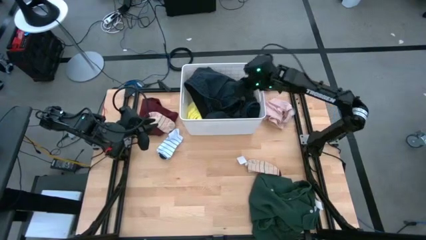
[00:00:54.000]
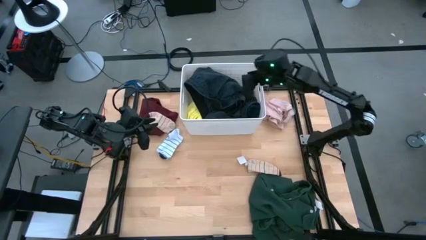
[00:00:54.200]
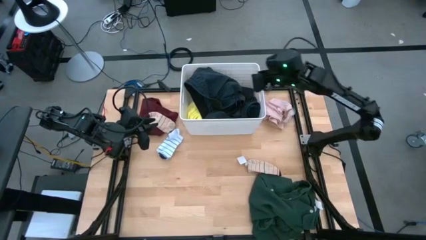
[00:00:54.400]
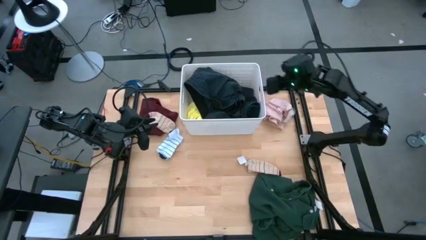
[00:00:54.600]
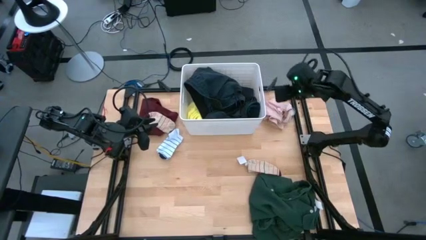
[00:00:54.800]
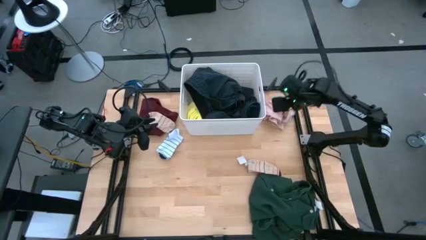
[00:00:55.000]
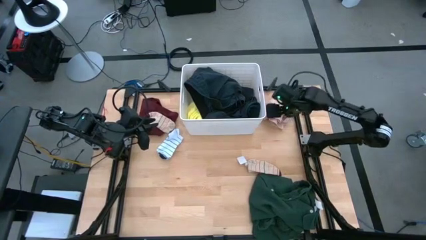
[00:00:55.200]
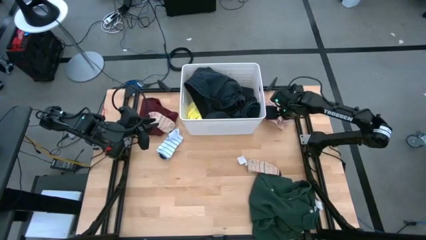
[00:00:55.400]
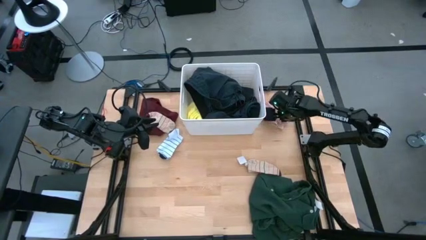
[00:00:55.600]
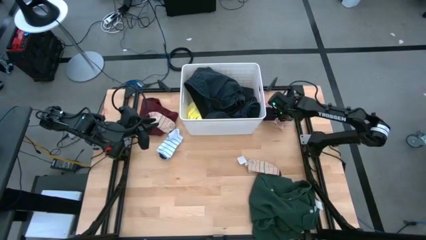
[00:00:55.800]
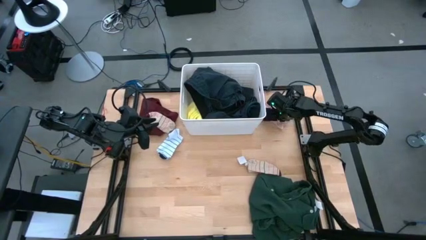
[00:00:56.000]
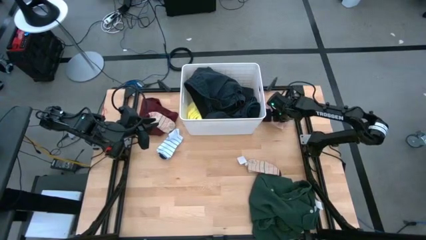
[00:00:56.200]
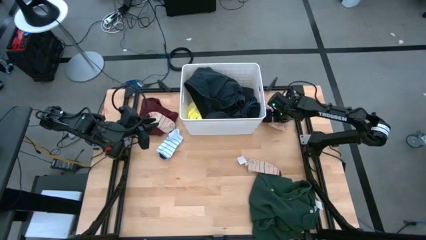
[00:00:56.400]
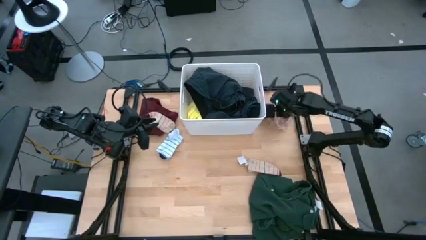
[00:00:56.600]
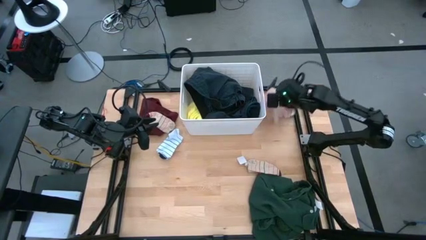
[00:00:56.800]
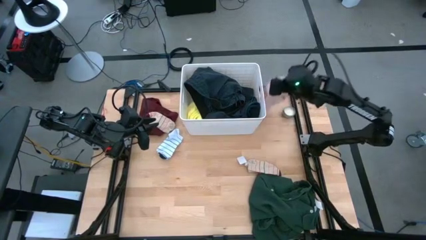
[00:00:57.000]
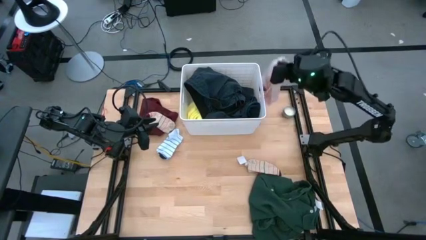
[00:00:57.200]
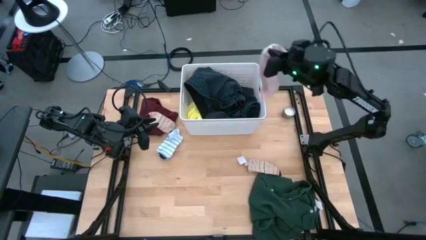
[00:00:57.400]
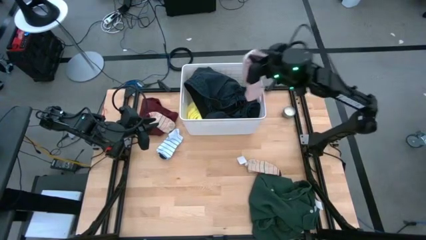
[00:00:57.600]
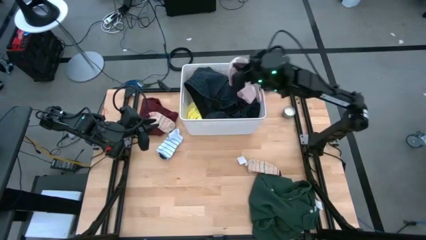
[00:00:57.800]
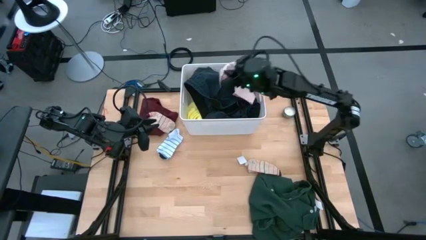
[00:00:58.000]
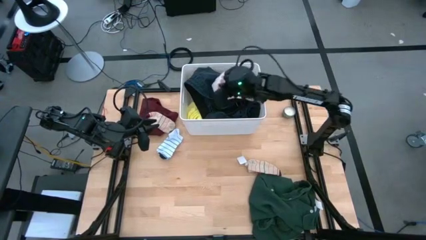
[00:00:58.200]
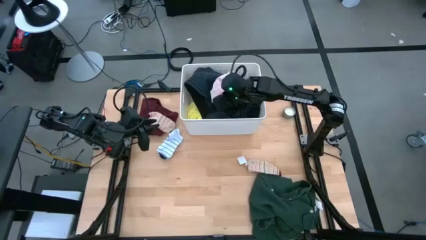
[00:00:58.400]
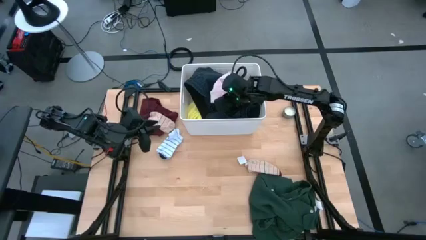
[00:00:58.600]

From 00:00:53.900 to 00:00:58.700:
Task: Sort clothes
Put the pink underwear into the white bin

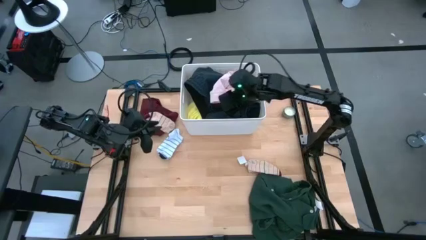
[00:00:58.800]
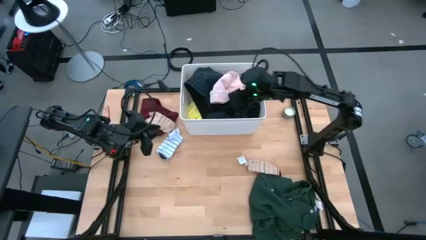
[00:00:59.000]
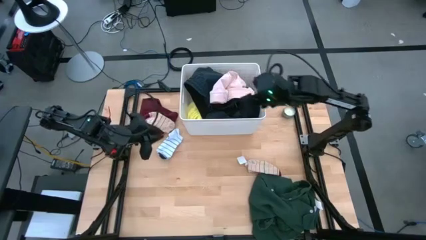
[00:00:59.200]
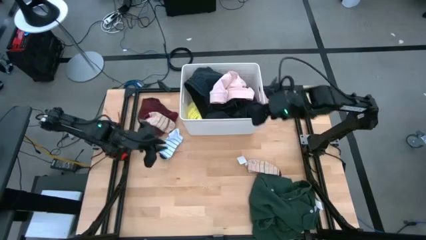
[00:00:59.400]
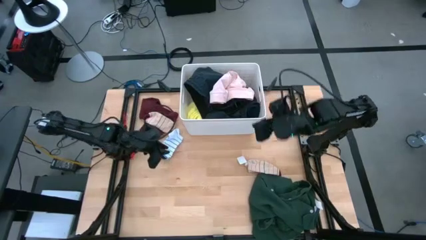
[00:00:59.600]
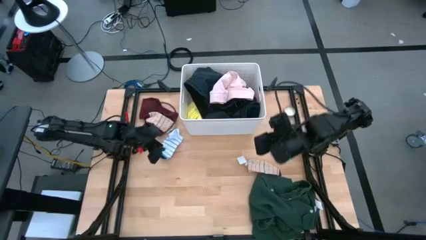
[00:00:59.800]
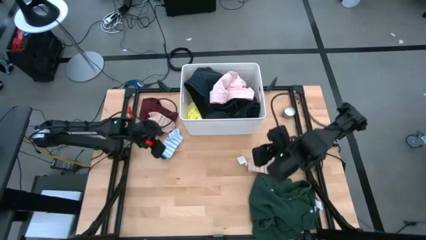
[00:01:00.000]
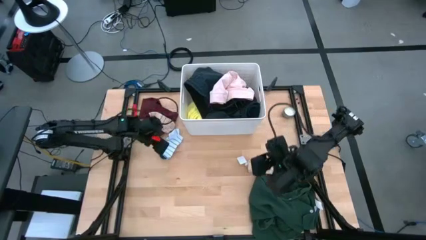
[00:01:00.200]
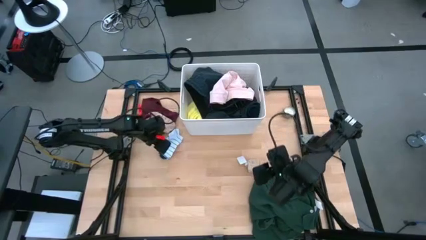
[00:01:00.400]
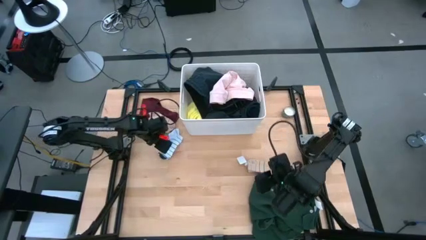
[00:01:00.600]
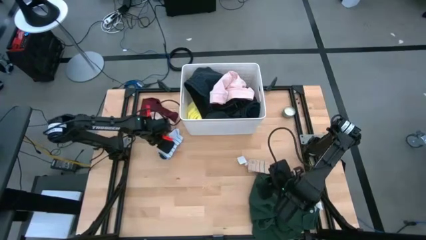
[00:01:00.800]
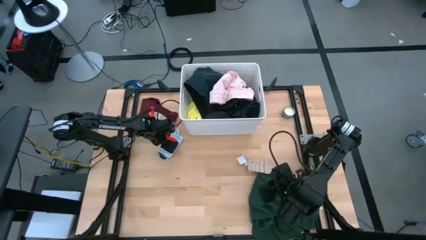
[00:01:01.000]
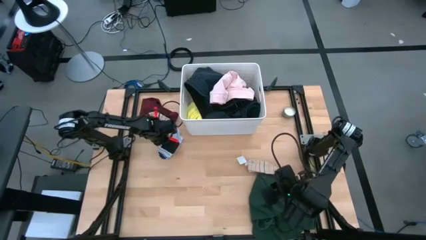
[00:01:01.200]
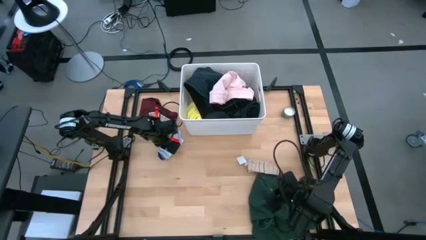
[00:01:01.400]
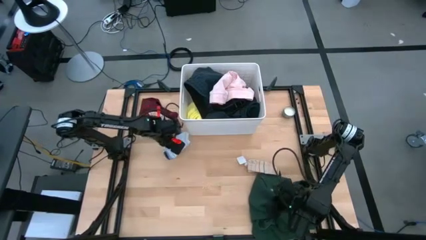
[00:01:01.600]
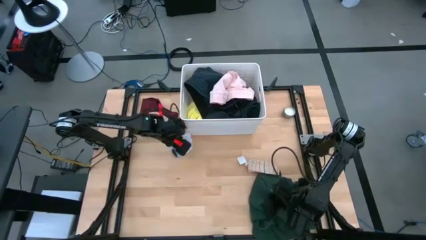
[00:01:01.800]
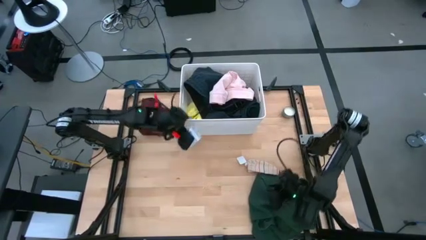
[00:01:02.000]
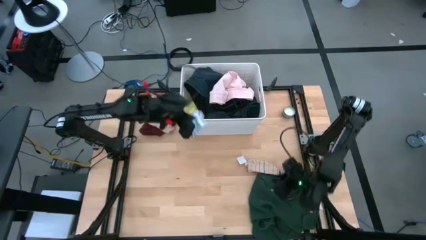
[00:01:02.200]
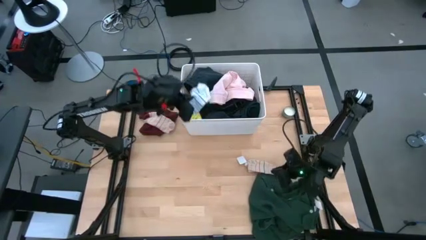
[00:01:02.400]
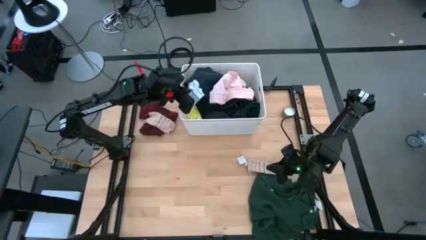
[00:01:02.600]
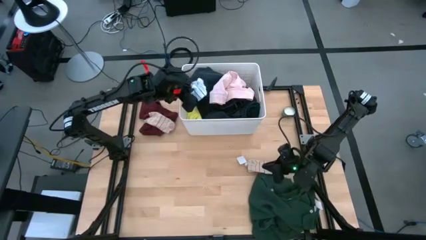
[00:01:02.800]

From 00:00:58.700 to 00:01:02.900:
Put the white striped sock into the white bin

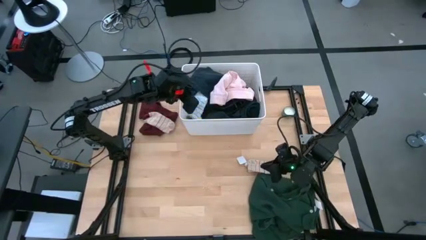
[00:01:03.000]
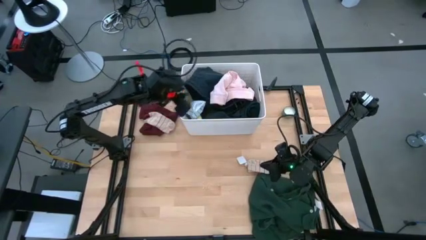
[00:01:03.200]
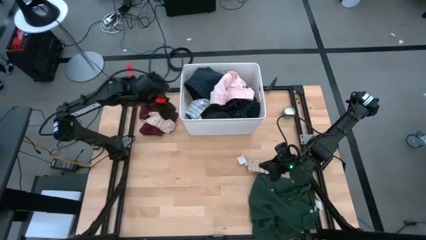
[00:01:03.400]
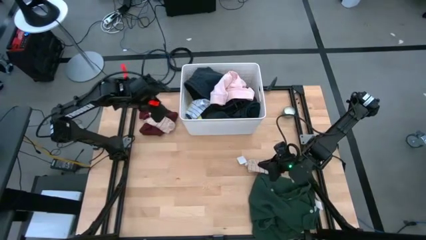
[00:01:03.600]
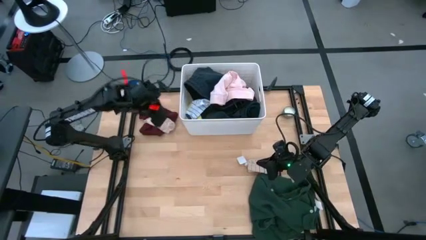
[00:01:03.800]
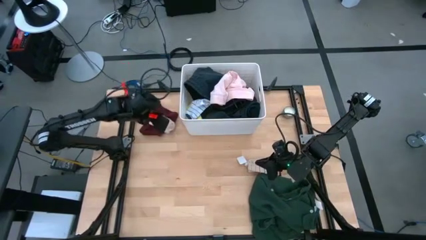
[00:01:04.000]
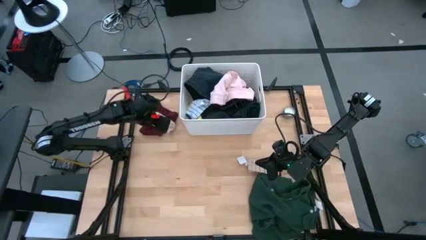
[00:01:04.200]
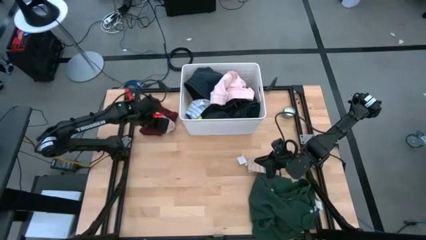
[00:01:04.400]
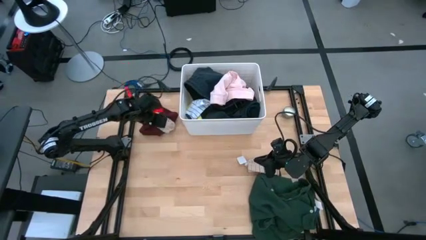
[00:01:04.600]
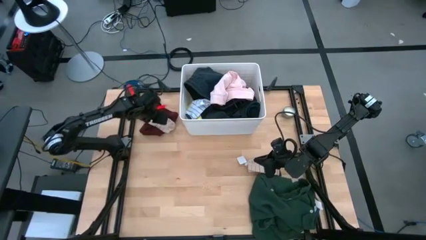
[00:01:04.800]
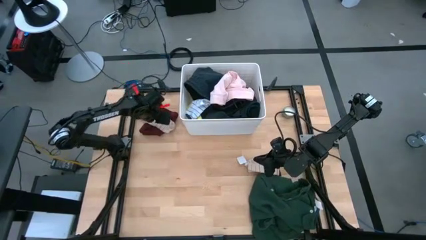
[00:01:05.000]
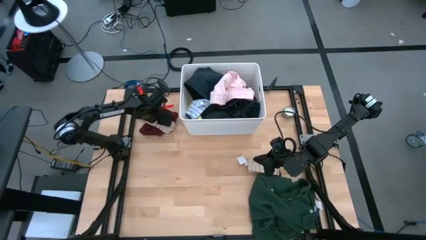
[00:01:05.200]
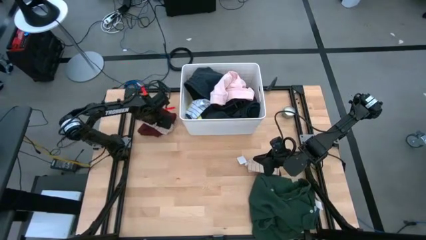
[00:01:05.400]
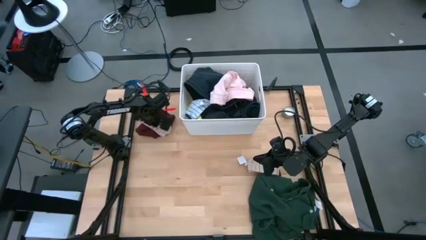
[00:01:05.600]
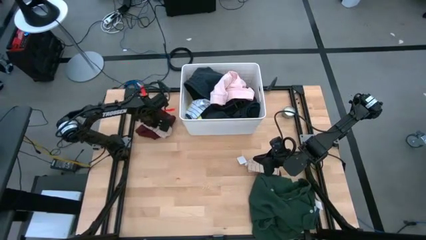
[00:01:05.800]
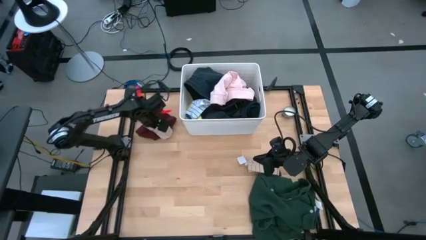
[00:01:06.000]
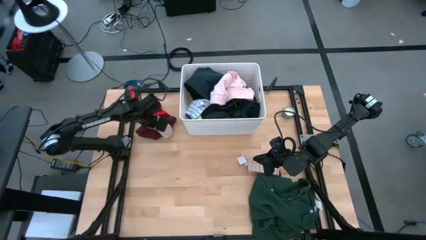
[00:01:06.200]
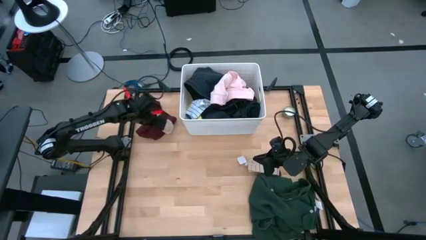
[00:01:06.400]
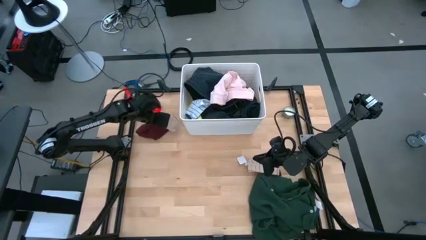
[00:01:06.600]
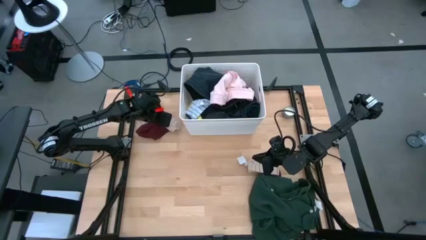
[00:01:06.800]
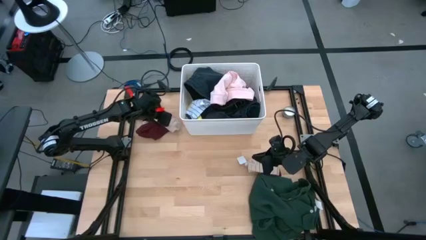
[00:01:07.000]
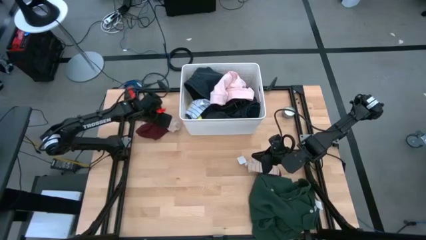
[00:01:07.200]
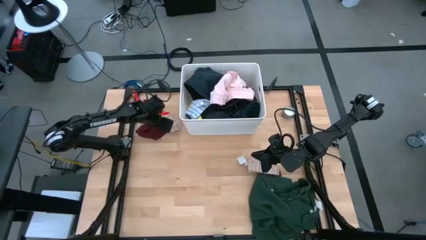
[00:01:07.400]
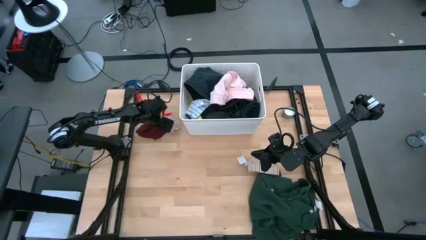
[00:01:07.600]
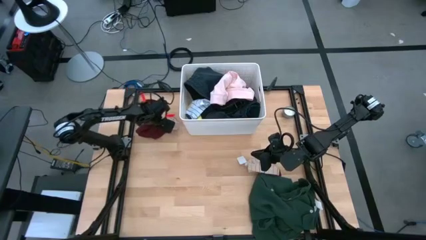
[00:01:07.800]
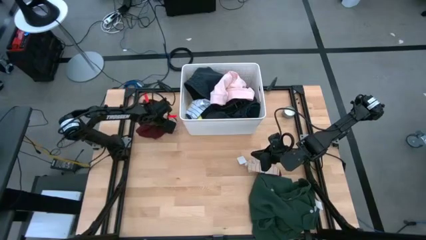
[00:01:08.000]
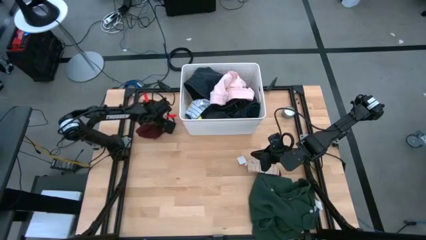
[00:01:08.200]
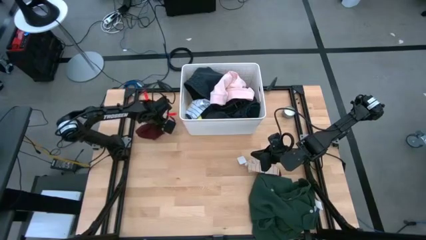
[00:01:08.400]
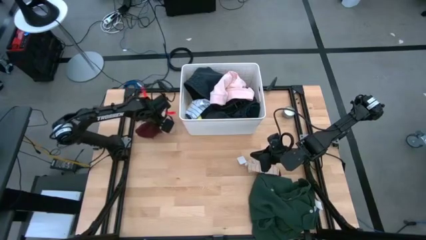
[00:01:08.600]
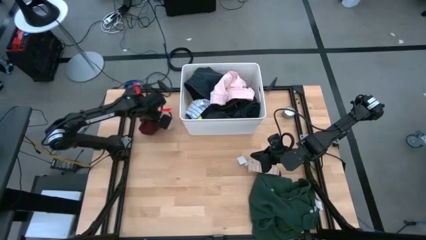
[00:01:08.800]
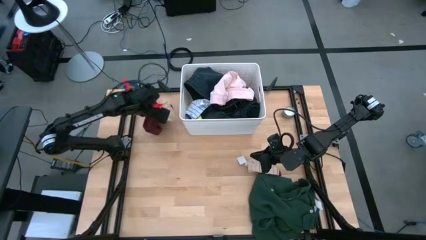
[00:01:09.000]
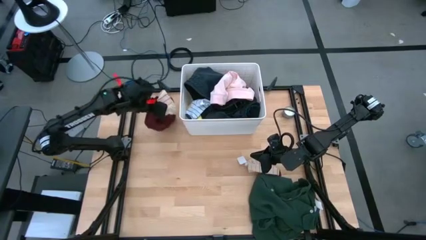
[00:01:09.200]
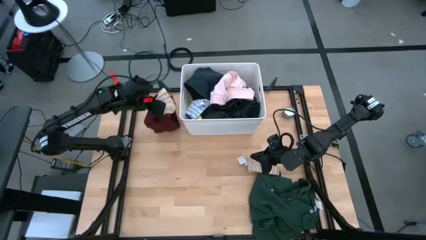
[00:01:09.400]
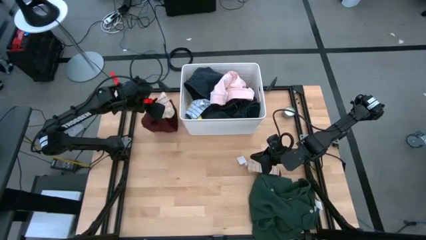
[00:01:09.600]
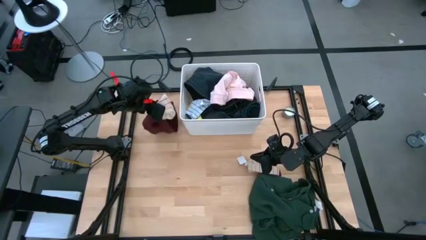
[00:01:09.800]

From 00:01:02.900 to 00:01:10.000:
Put the left pink striped sock into the white bin
